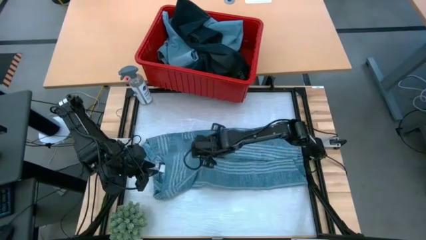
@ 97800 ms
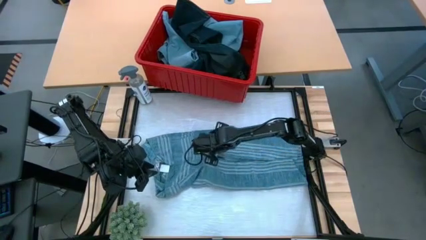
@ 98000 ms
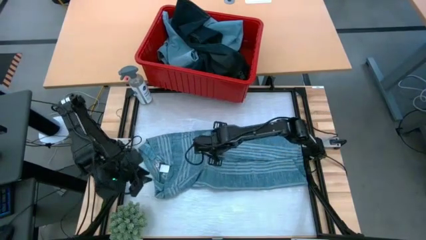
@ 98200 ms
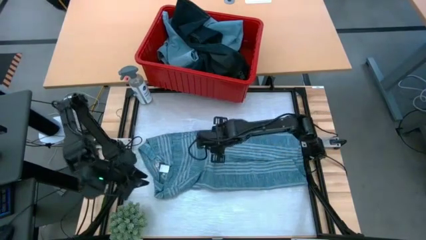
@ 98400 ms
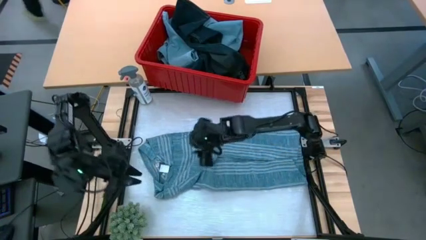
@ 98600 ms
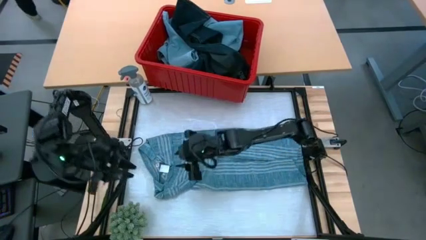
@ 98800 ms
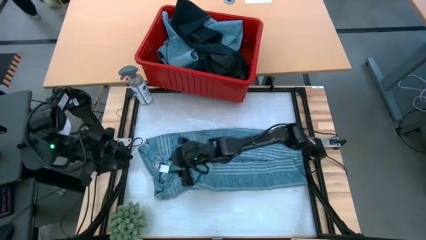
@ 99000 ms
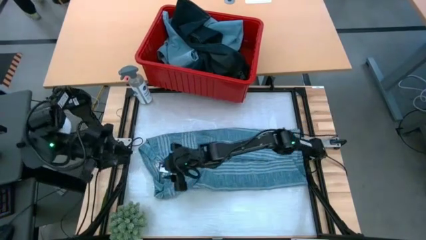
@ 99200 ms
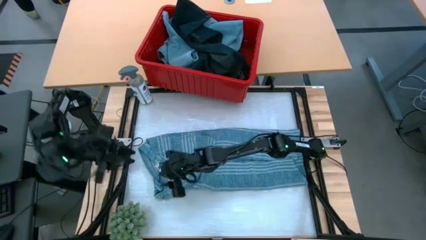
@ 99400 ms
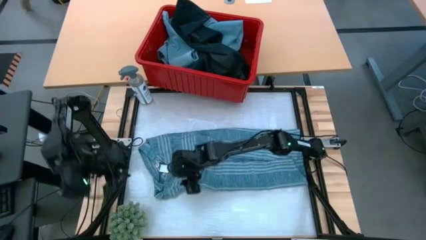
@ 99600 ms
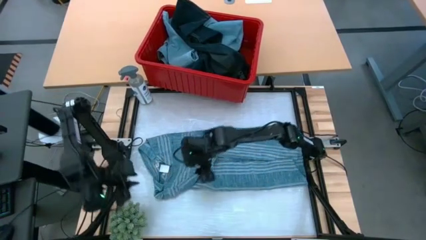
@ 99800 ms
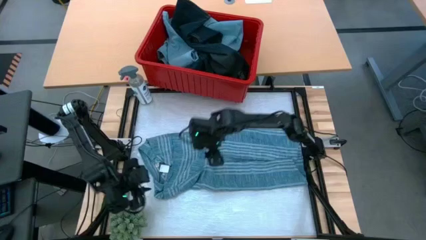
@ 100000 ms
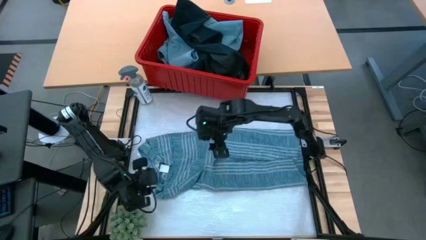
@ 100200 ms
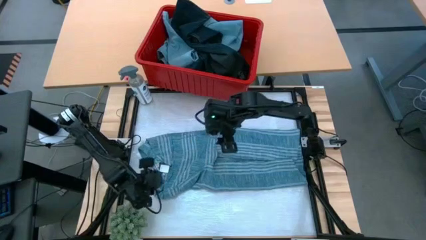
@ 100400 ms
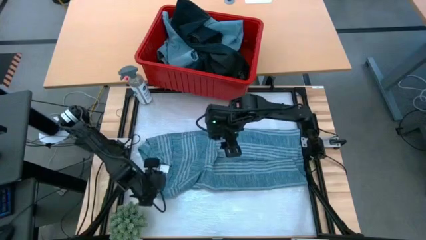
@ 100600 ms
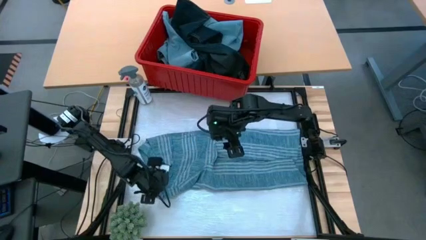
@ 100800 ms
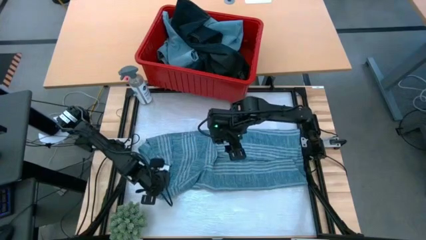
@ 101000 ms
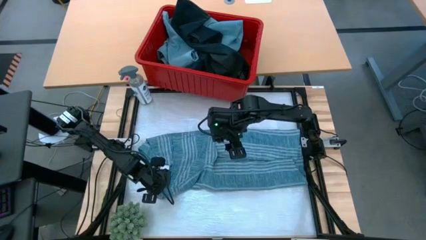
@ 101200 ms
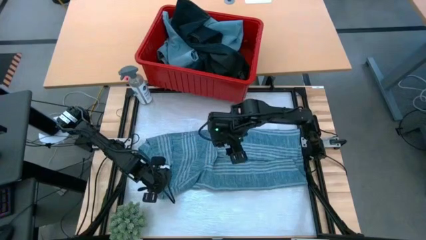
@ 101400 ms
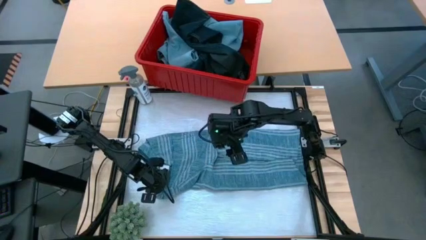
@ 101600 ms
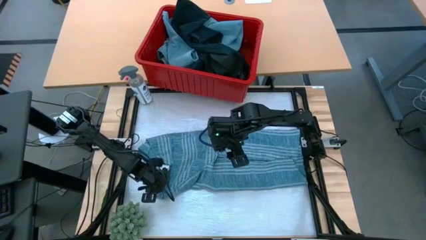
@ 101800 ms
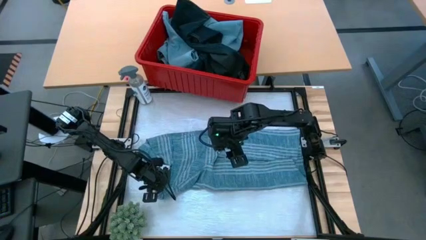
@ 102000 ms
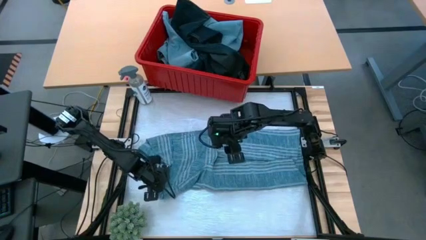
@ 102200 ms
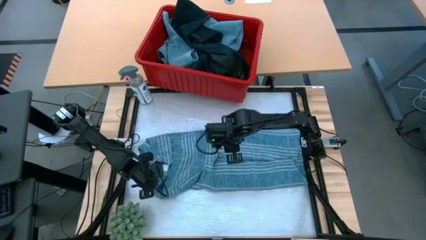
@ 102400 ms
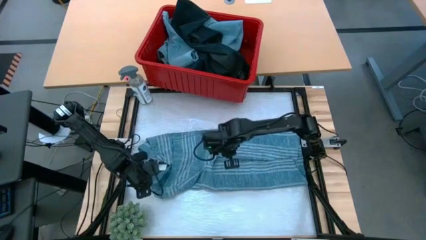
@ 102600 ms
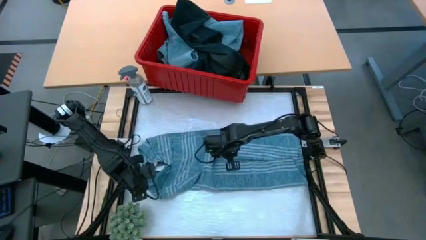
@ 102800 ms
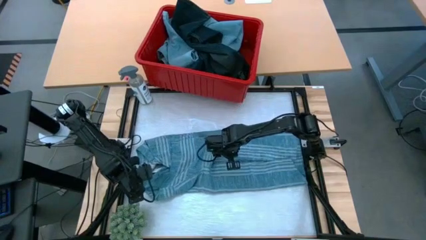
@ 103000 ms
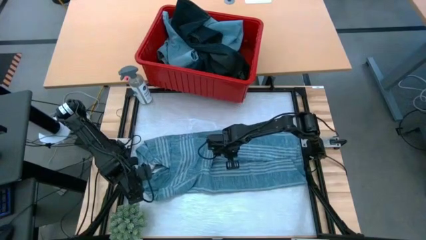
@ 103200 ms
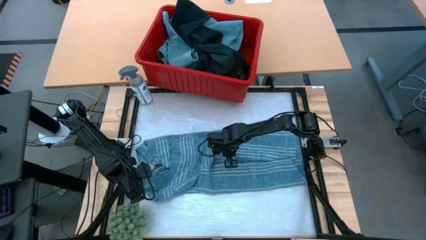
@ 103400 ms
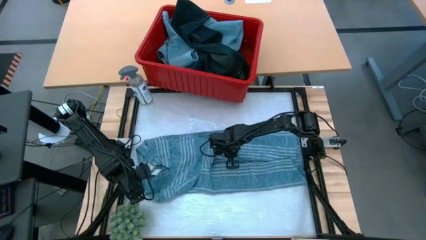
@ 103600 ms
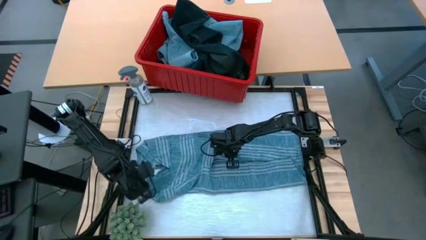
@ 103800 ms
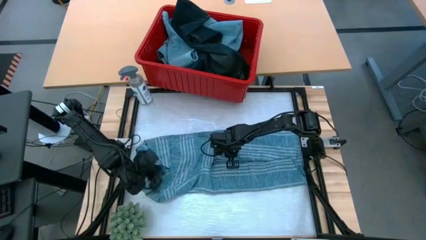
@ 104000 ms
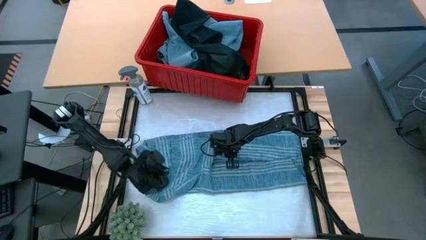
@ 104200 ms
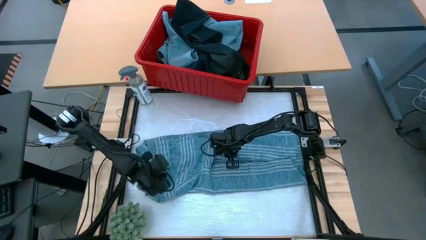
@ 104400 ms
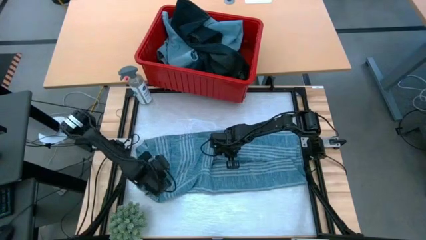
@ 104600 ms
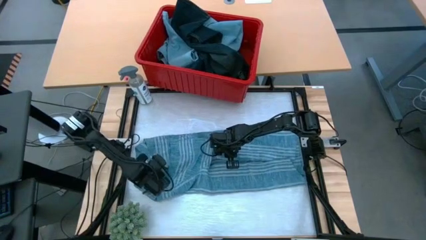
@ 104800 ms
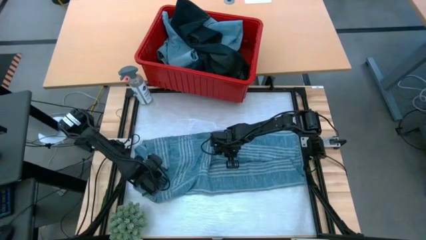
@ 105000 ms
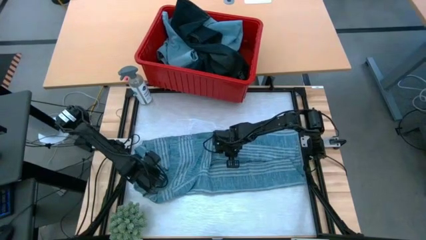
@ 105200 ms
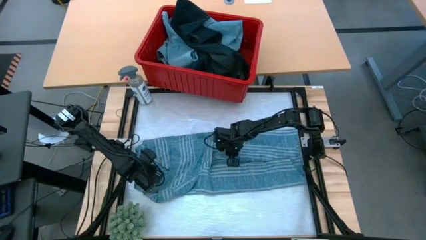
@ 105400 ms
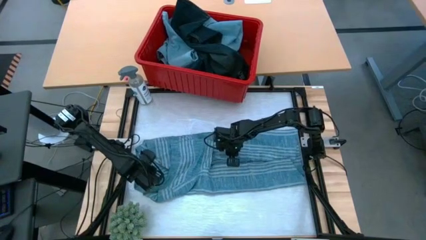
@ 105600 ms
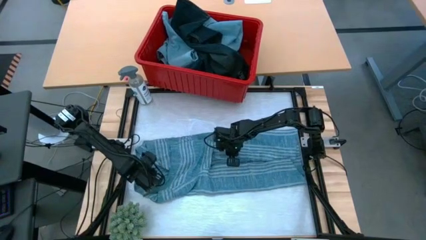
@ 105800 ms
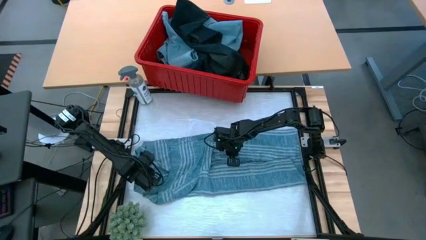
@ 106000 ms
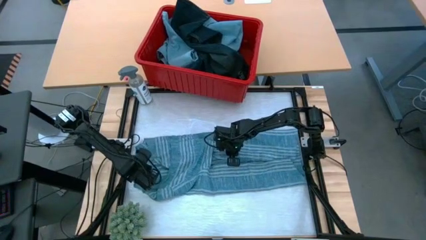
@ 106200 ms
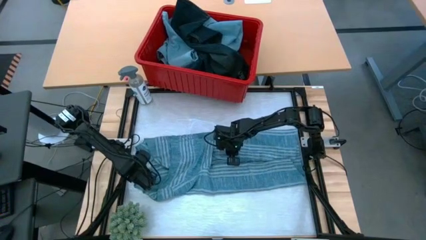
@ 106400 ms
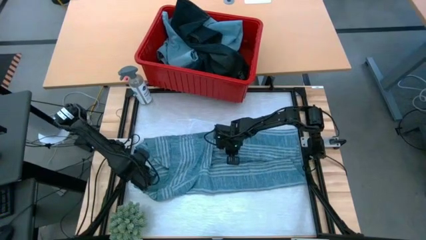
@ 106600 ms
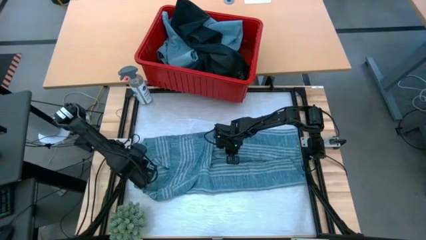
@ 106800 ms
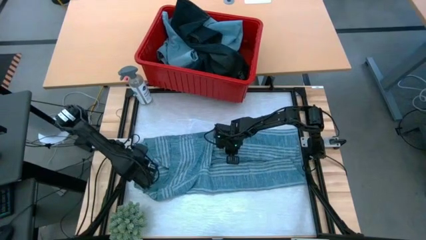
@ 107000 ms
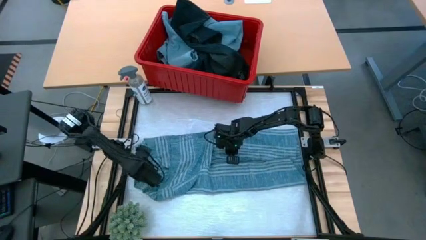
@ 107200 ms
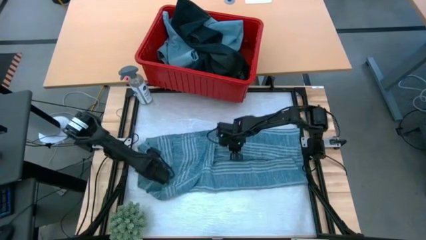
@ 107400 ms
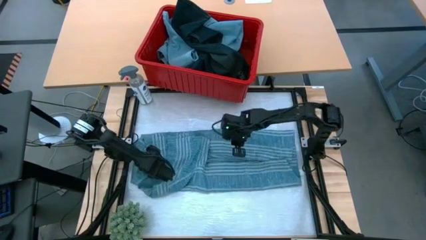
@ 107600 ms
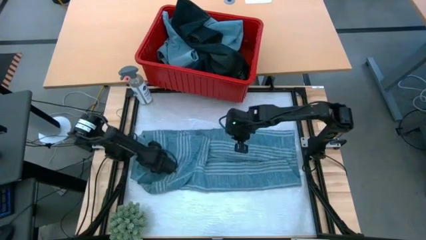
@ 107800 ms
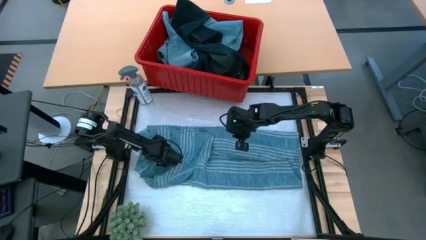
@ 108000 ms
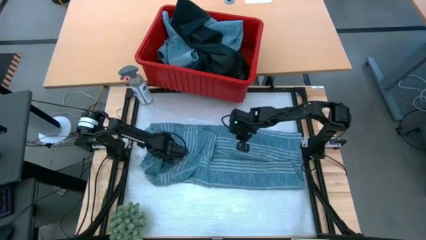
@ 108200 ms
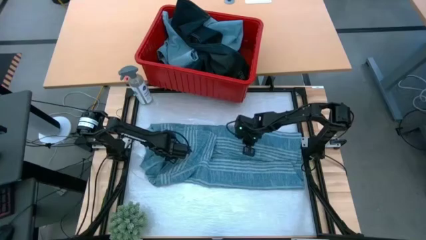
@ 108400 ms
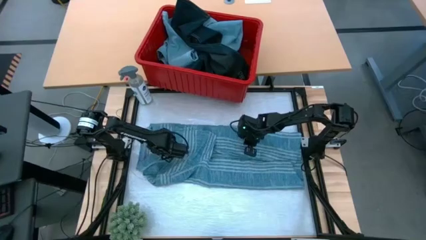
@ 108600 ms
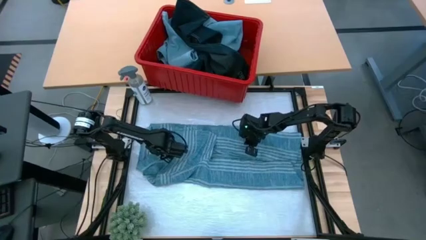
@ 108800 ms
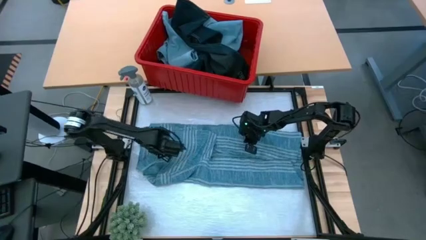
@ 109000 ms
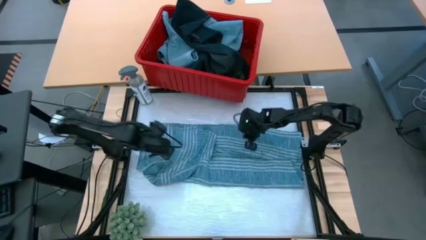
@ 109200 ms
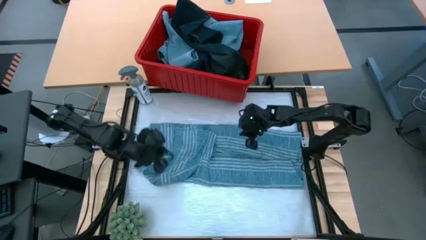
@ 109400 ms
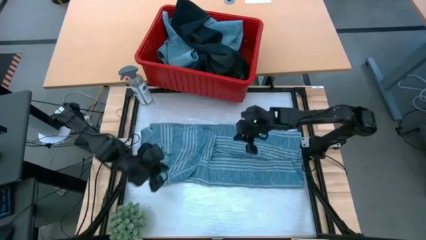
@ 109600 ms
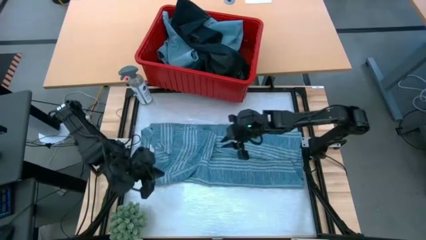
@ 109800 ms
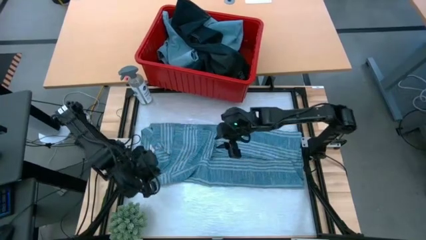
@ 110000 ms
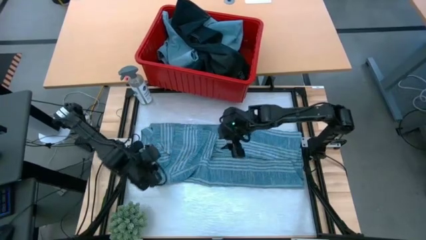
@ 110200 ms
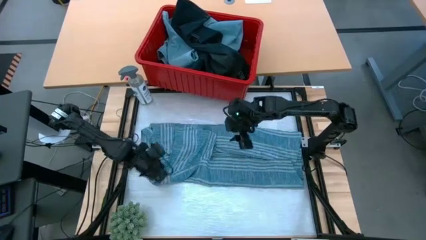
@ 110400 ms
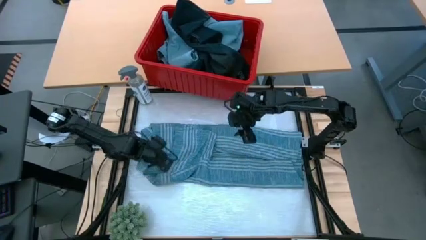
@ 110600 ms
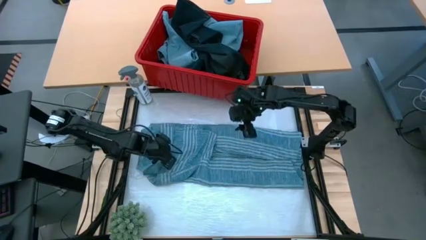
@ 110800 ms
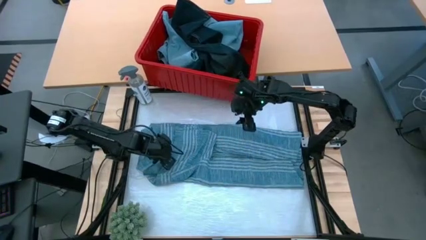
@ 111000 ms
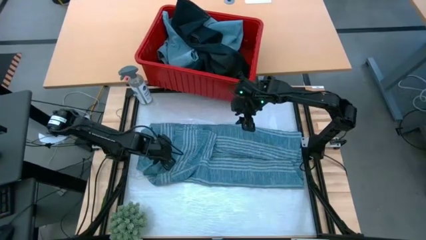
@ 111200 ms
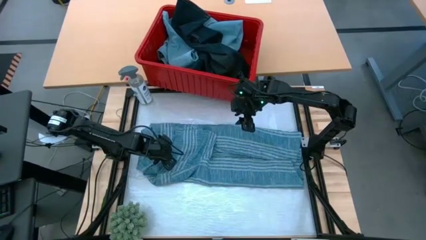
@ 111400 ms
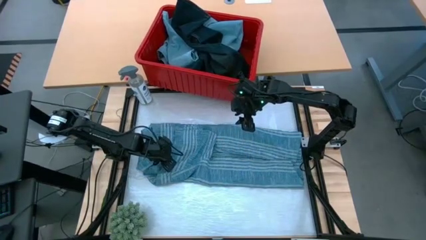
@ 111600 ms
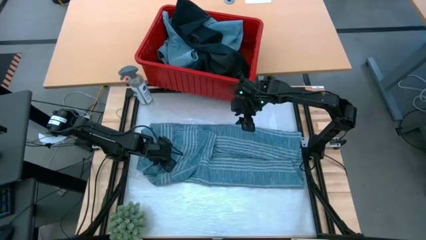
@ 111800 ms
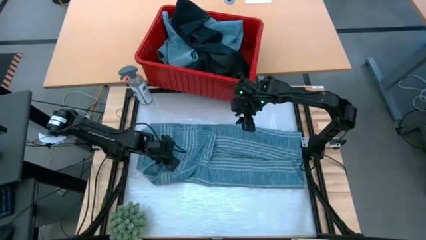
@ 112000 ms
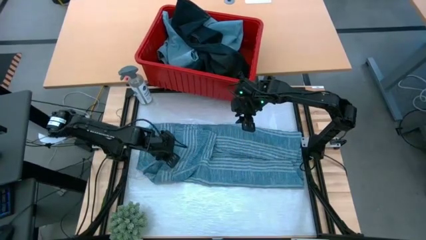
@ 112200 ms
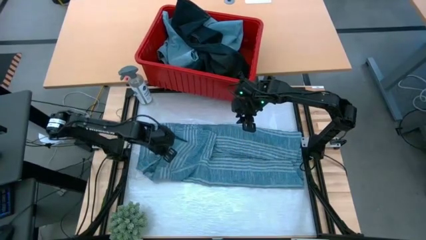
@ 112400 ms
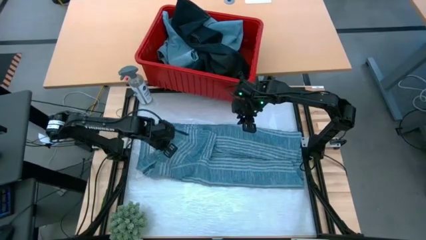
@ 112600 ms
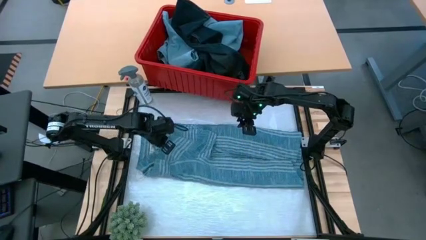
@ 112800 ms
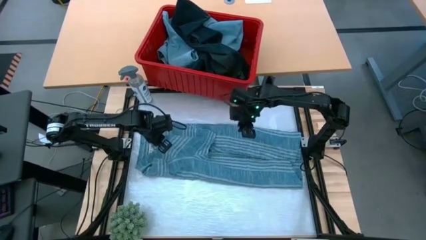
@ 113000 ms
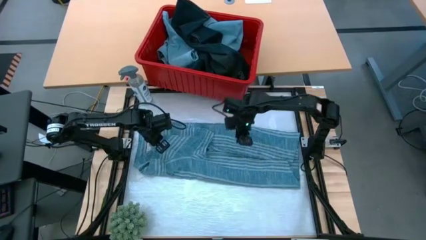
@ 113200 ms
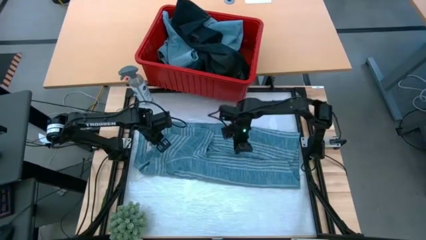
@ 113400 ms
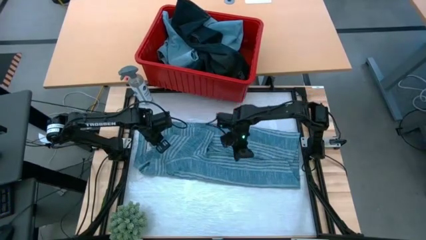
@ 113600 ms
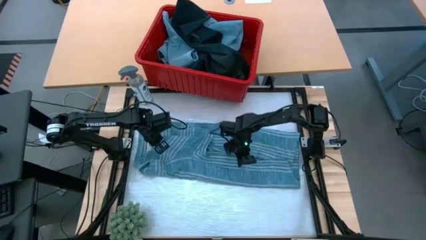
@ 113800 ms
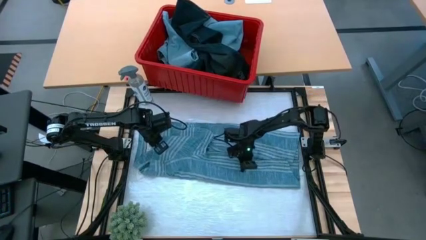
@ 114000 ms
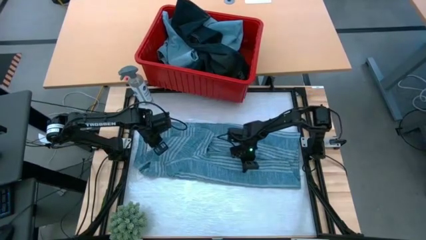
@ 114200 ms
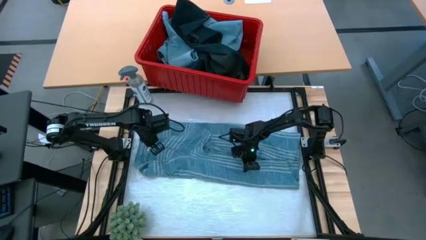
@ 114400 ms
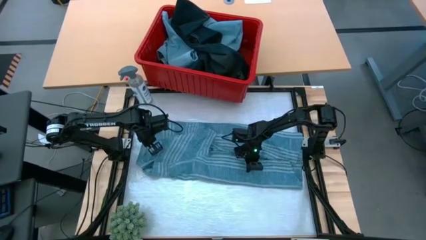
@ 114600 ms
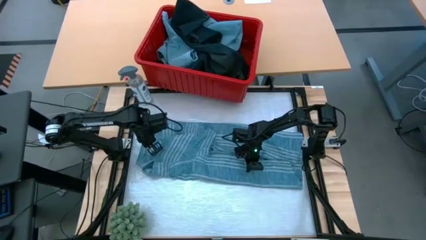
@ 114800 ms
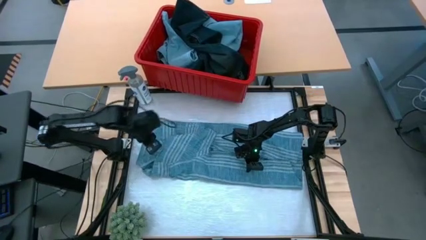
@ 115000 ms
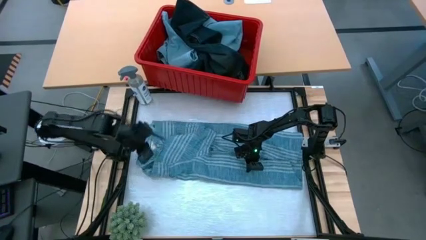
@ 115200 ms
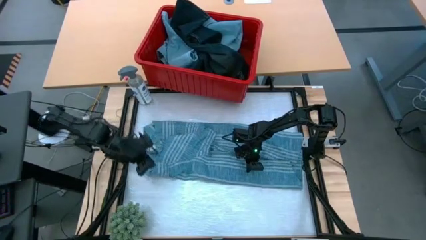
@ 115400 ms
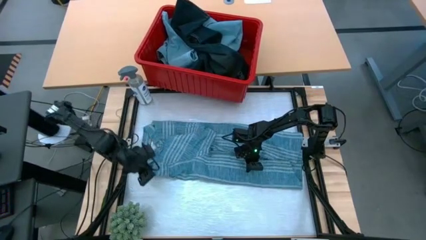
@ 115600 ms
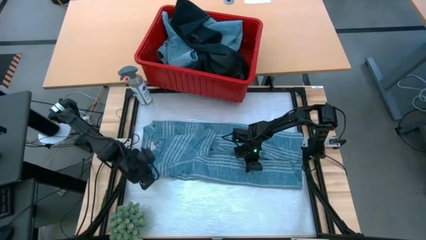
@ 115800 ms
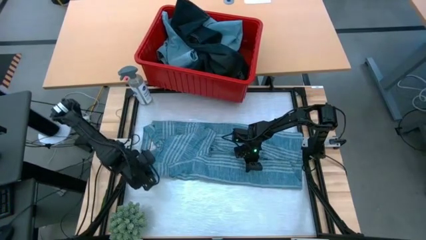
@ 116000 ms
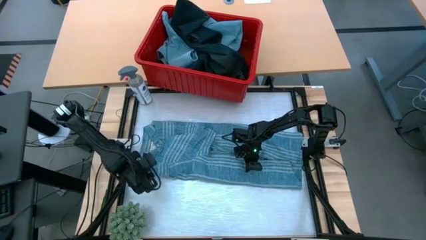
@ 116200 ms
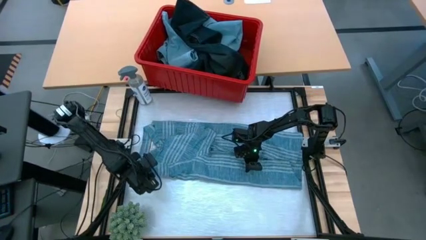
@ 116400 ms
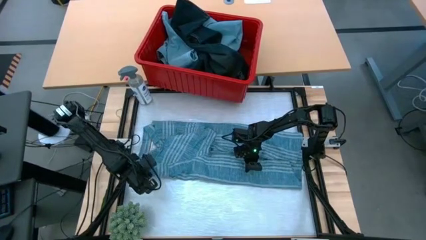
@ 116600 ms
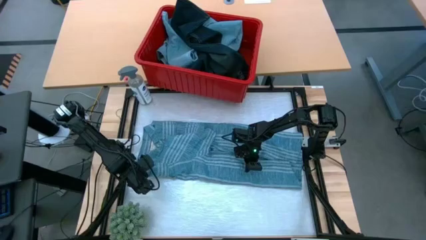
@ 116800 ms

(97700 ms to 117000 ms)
Task: Fold Laundry from Bin
Fold the light blue shirt
